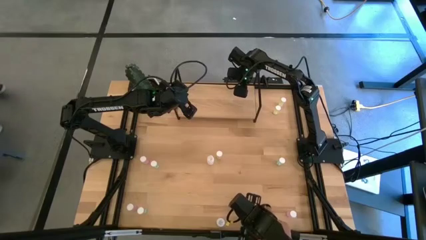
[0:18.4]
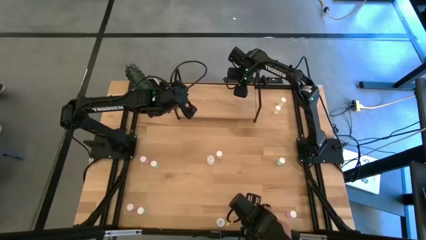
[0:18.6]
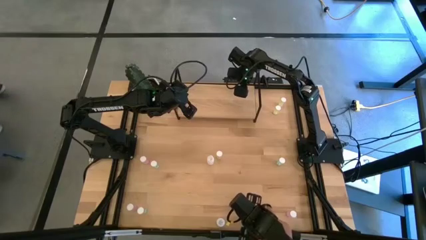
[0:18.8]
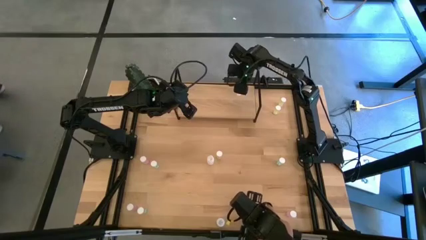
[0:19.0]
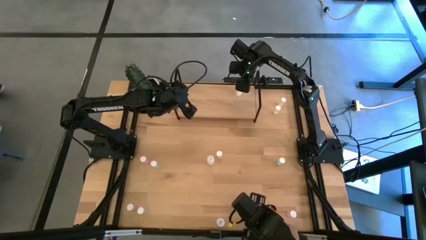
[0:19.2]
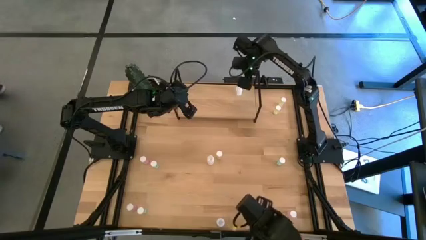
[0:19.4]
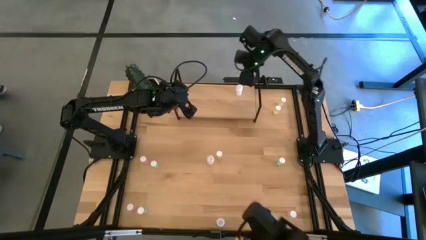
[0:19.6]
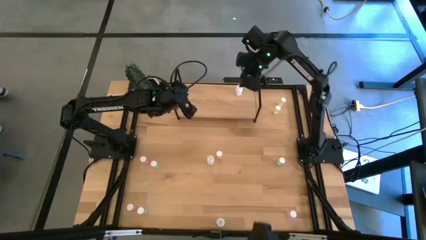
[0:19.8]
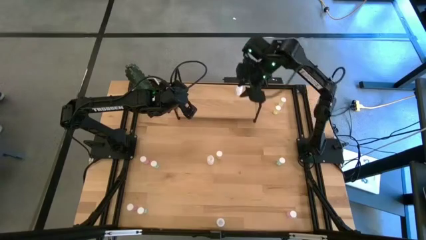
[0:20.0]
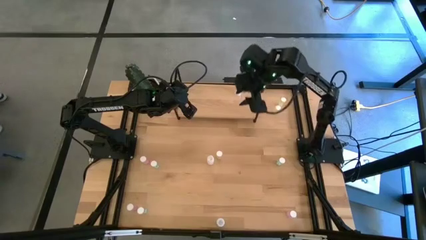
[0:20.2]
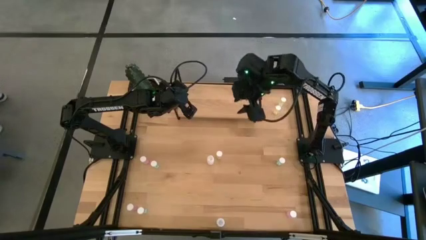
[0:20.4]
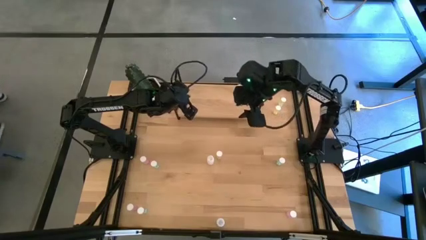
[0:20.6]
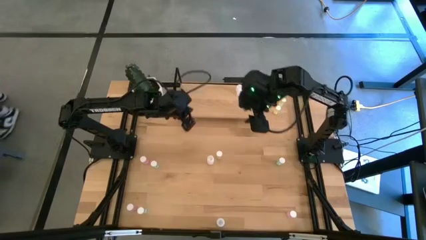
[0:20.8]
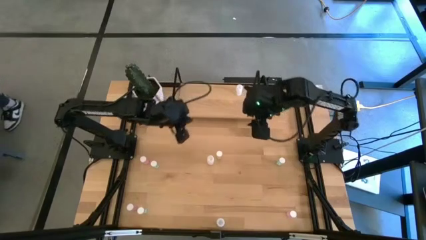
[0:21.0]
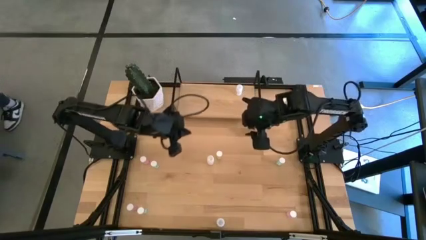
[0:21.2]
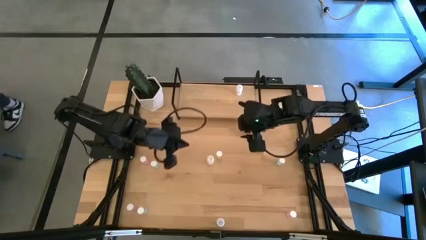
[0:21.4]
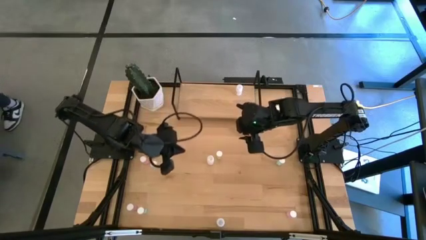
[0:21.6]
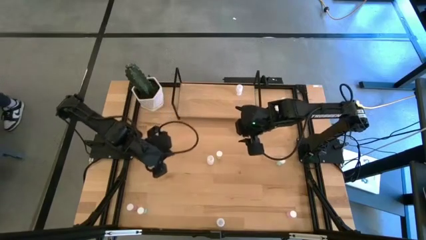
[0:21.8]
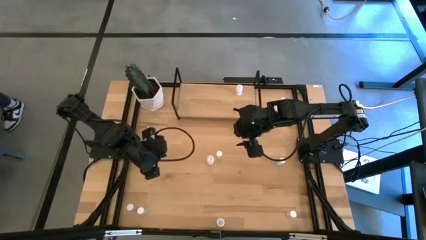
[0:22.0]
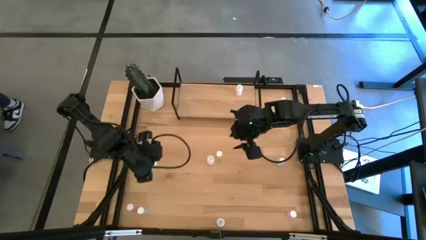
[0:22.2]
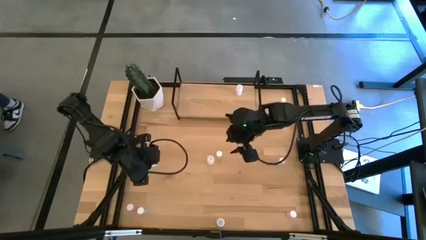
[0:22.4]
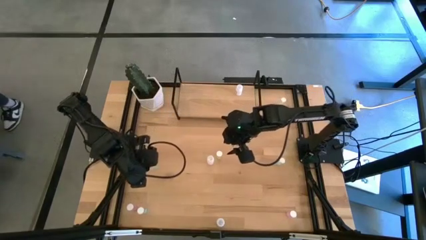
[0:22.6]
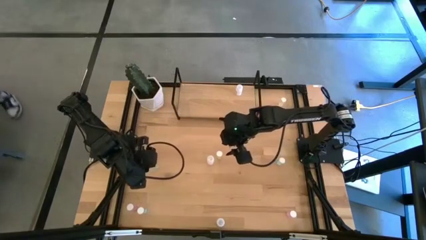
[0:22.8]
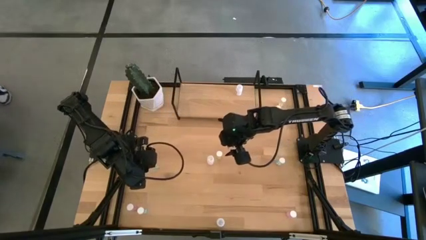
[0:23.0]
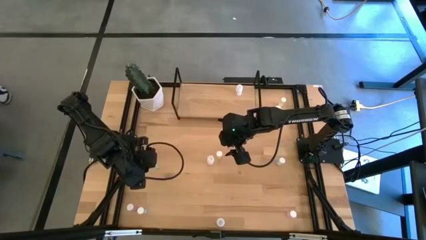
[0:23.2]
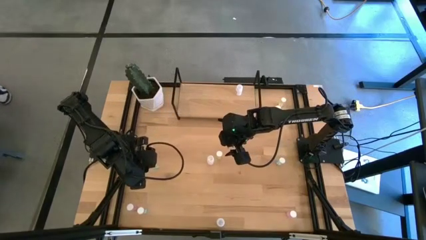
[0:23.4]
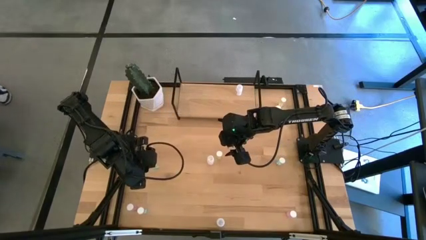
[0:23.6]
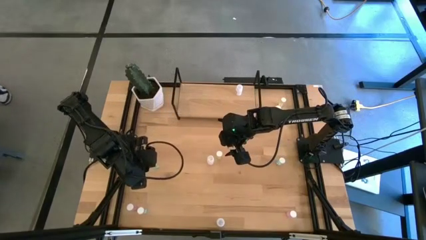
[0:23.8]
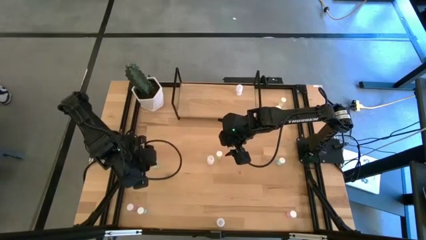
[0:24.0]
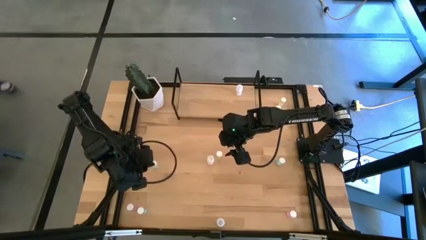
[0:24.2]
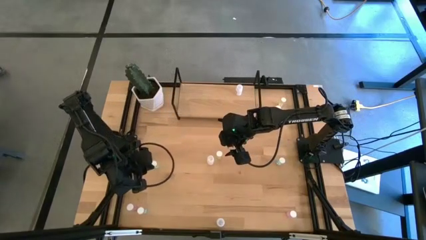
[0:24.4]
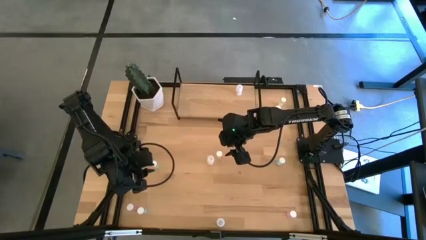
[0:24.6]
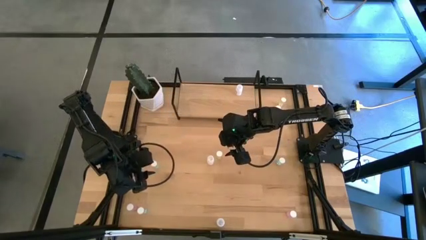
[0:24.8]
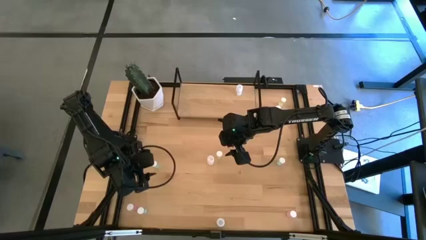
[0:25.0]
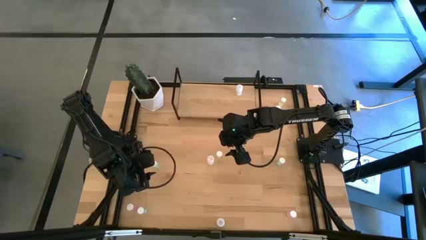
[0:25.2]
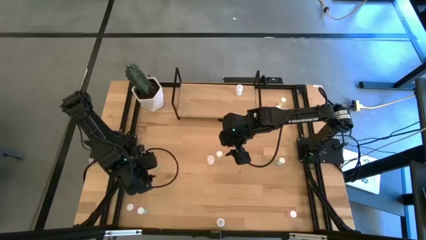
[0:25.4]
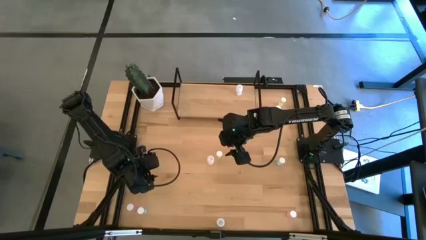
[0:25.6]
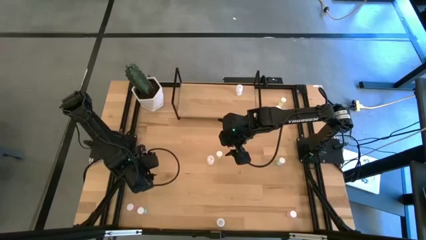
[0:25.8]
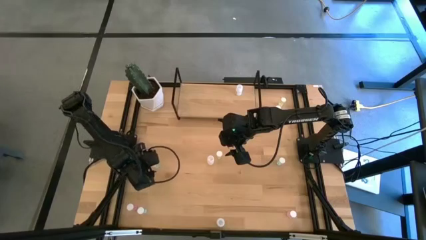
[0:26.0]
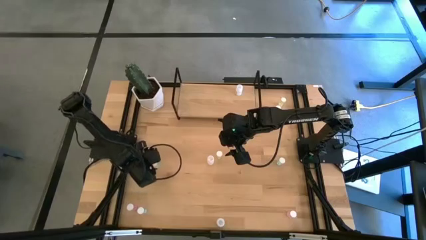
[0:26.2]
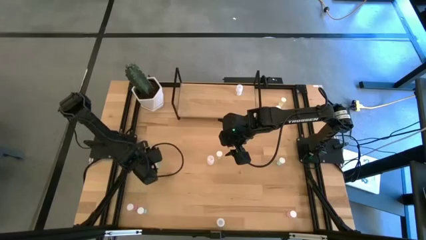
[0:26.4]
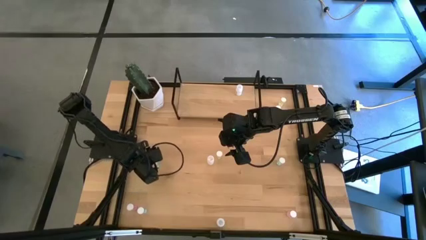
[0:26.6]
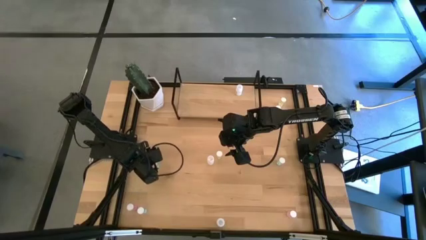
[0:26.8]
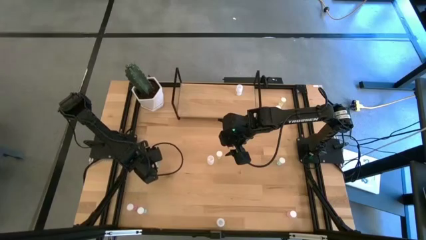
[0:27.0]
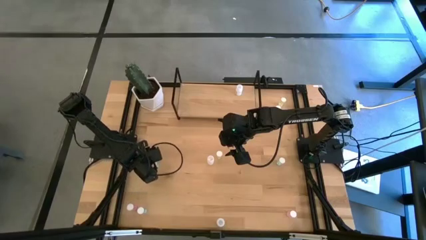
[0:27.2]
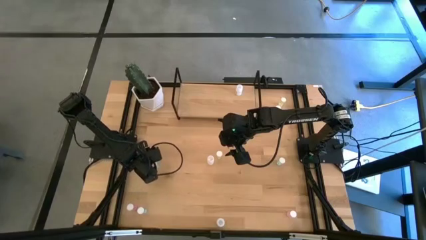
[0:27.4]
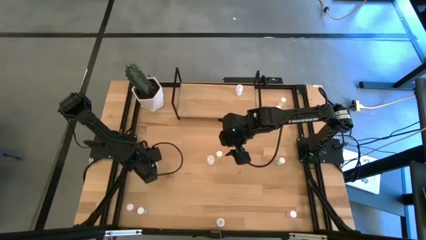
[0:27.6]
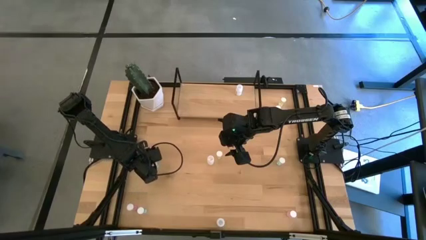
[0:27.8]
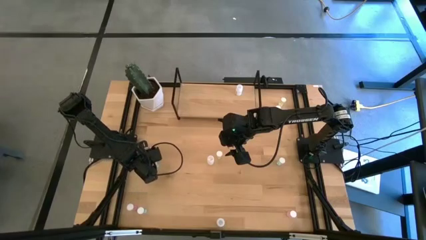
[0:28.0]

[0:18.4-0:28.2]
Task: Pick and place medicine bottles onto shelf by color
Put the top left blue pill bottle on the shelf
